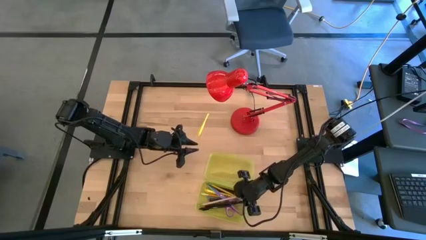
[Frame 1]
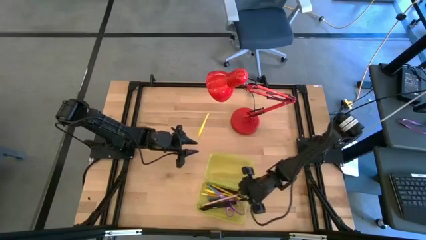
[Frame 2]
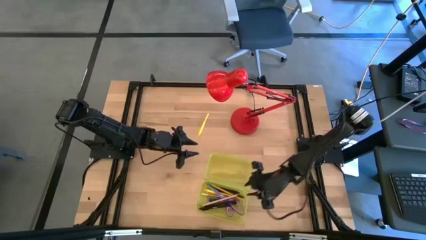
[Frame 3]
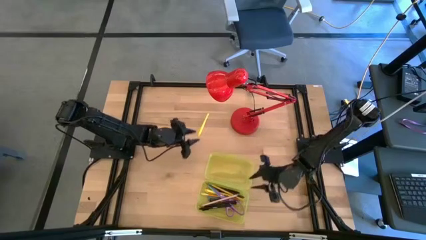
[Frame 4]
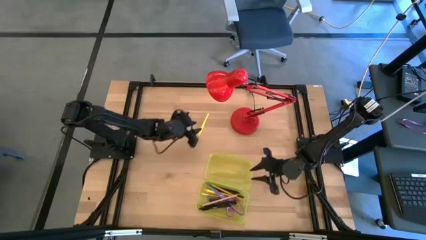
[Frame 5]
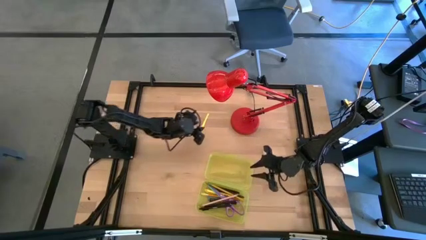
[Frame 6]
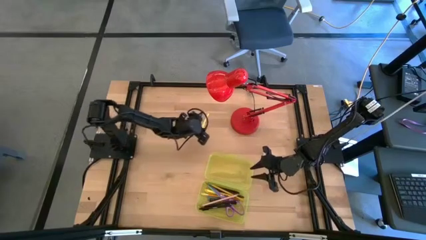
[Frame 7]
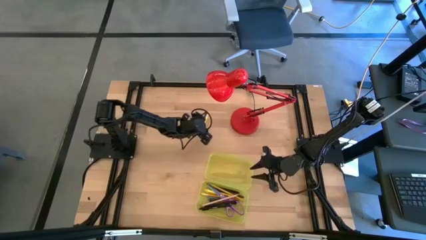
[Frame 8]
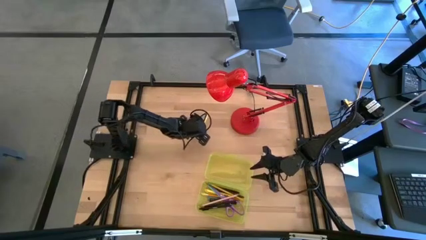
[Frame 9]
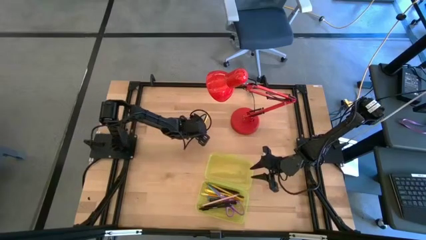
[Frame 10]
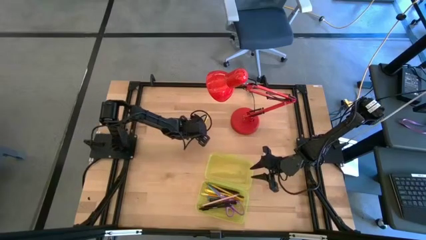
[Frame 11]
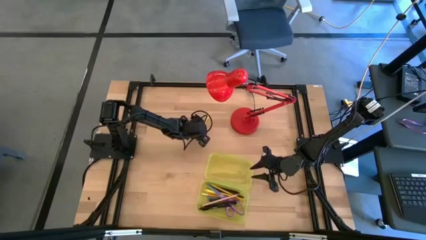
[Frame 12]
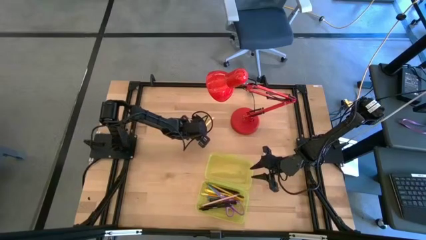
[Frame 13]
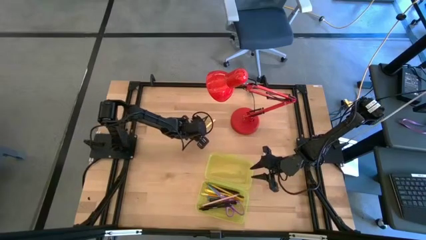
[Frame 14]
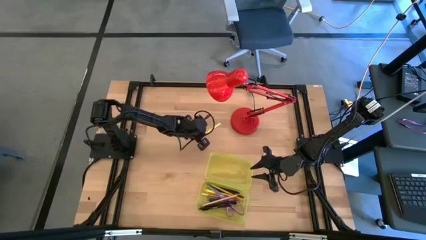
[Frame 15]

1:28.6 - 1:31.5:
Task: Pick & place school supplies into a supply box
Put the yellow pen into the yellow supply box

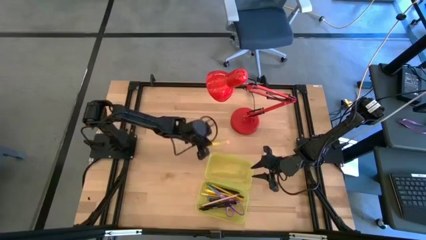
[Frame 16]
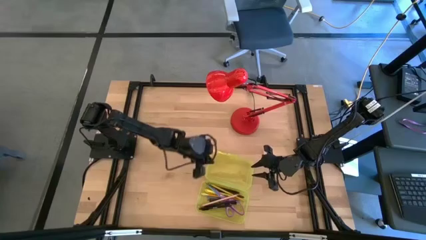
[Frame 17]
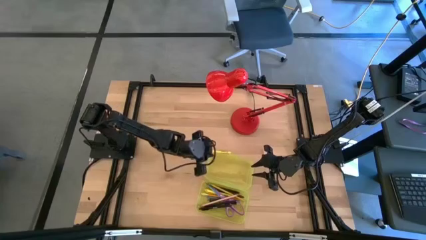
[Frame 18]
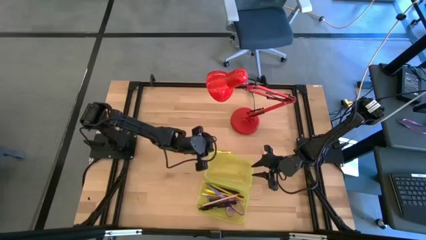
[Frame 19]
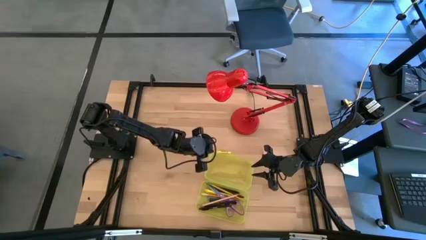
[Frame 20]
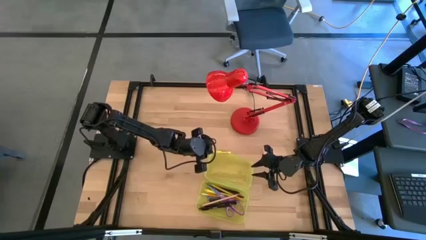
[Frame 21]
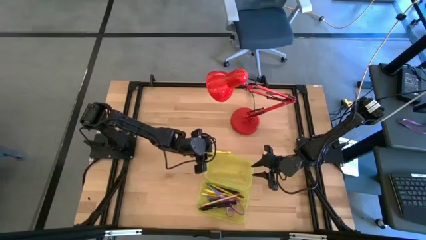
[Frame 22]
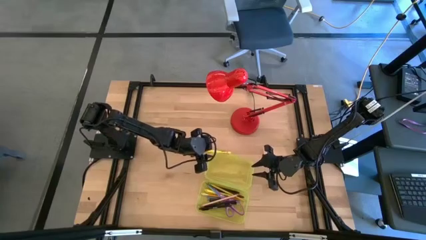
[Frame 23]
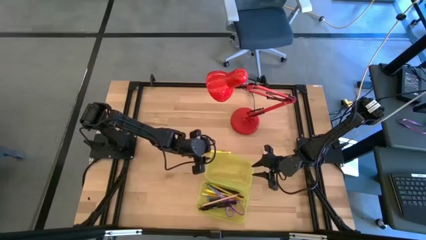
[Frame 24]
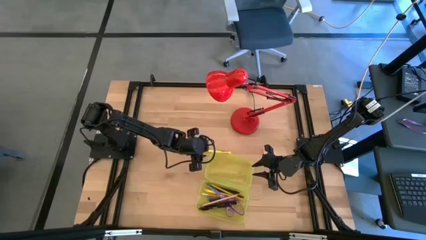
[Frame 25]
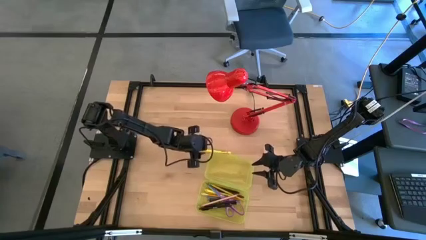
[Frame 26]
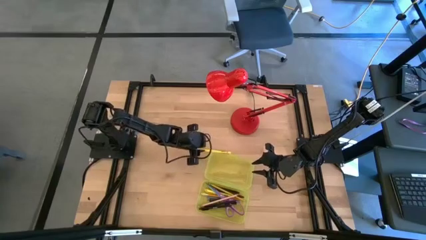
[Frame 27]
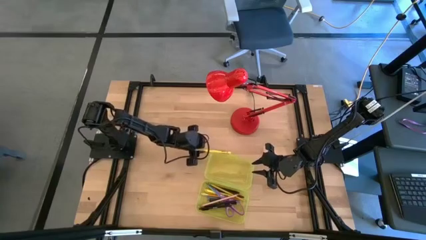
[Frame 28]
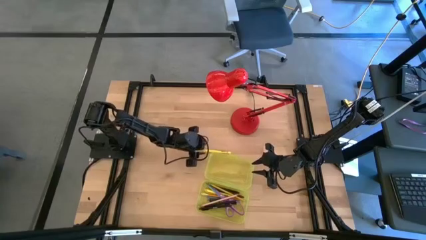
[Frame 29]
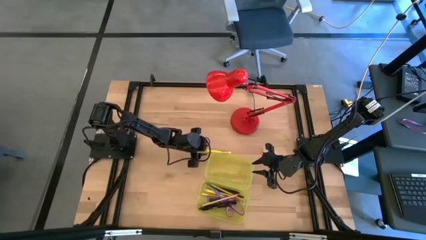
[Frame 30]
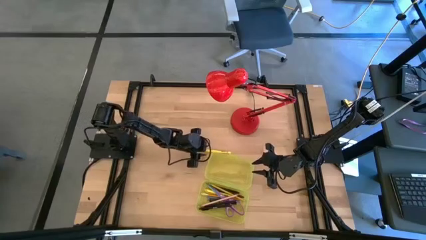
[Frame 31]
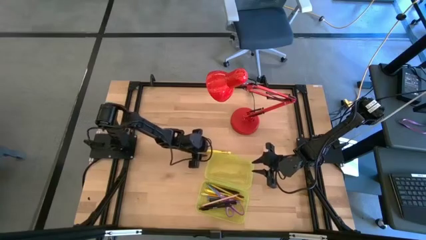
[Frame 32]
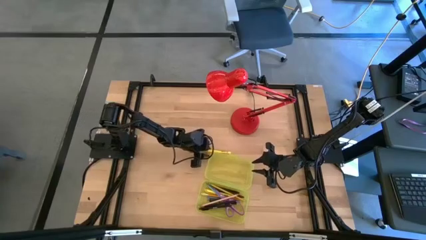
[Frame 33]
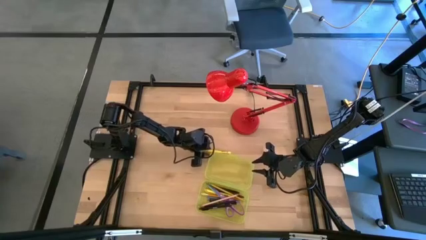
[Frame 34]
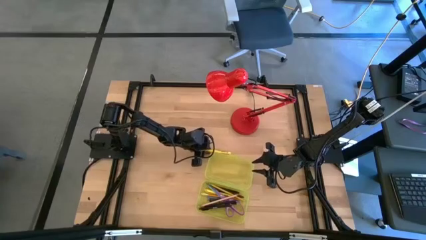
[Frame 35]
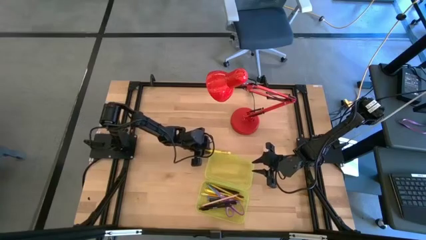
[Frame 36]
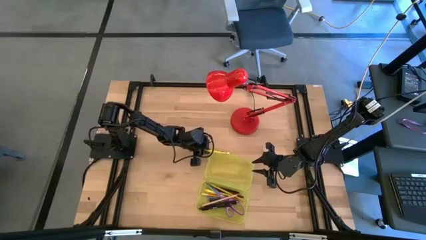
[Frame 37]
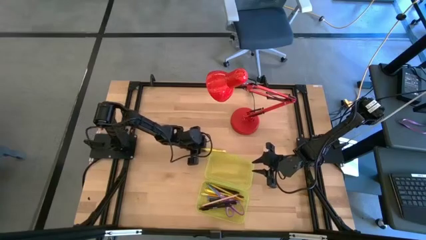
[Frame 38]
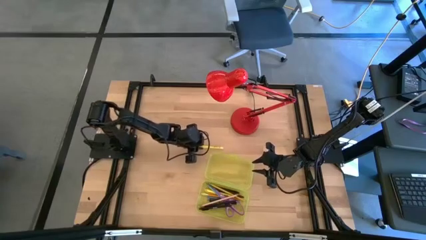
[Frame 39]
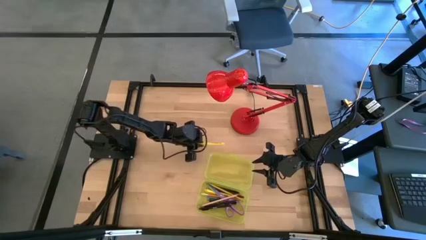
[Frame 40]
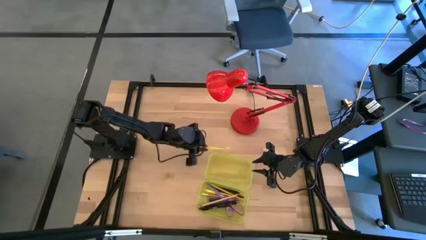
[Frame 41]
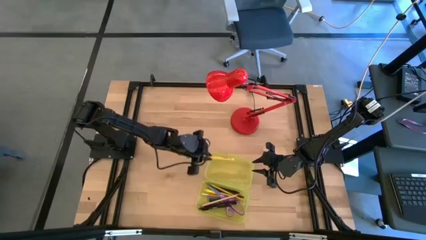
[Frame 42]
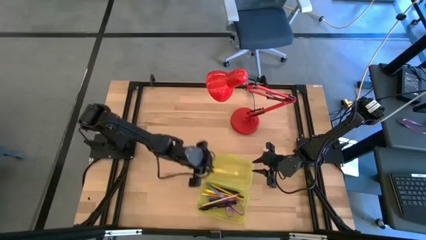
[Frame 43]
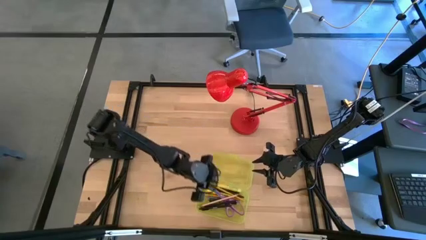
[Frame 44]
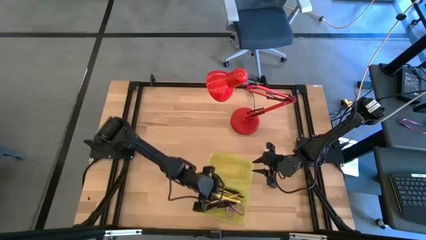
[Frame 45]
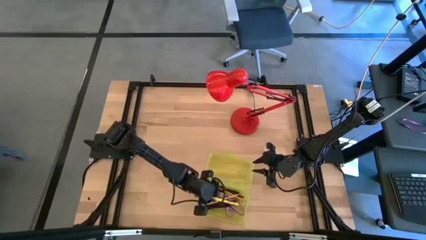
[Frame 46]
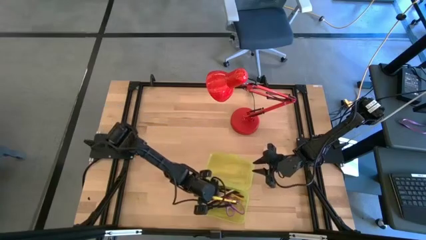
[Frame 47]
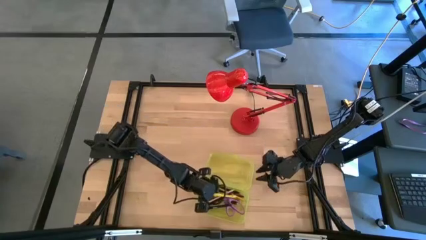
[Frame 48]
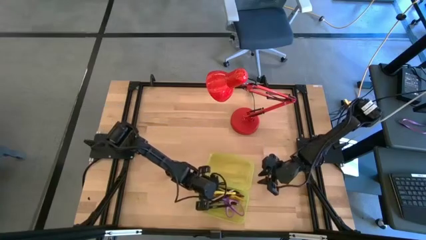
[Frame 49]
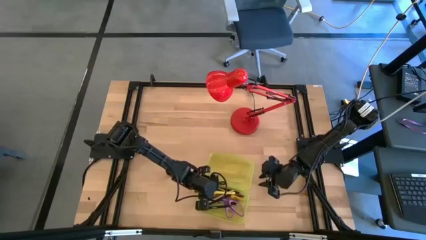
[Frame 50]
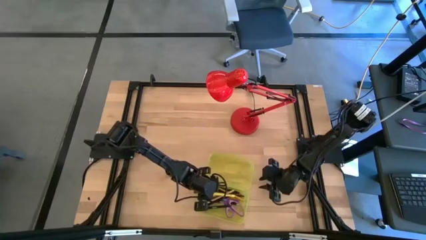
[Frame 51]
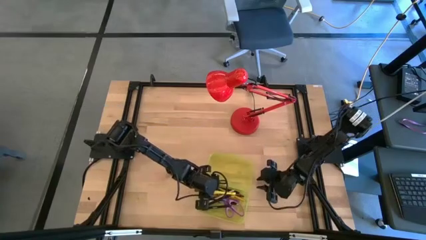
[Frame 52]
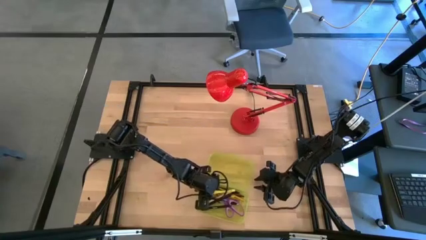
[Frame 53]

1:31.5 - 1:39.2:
Put the yellow pen into the yellow supply box

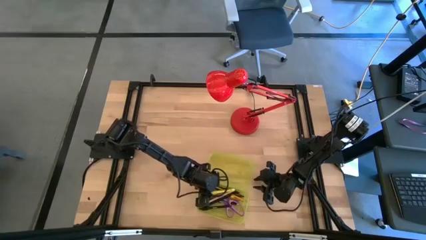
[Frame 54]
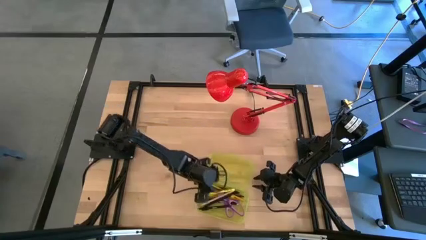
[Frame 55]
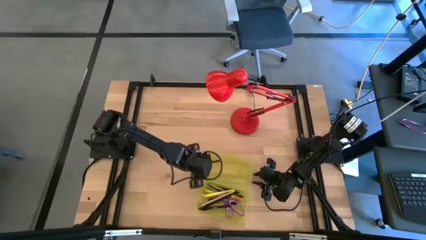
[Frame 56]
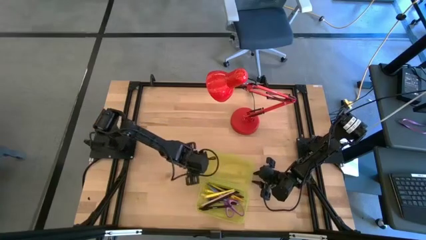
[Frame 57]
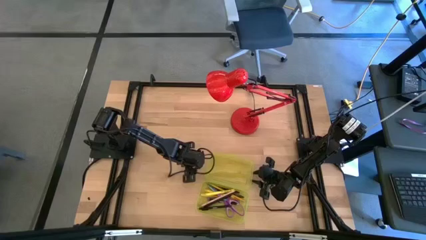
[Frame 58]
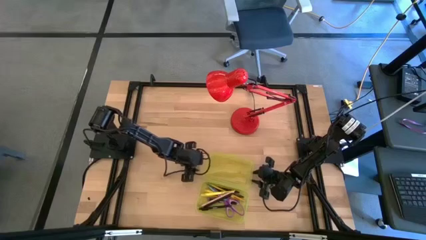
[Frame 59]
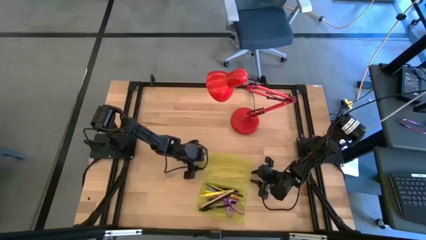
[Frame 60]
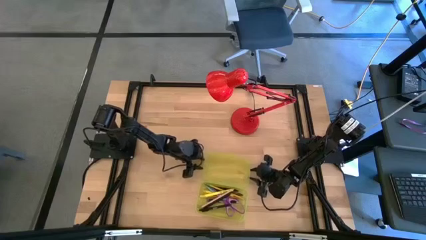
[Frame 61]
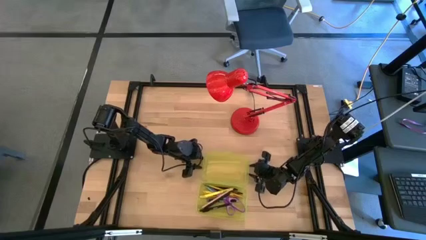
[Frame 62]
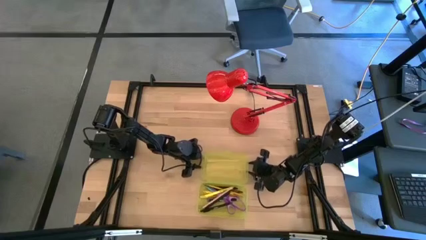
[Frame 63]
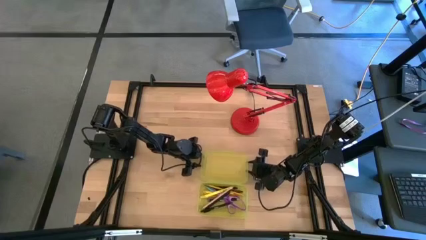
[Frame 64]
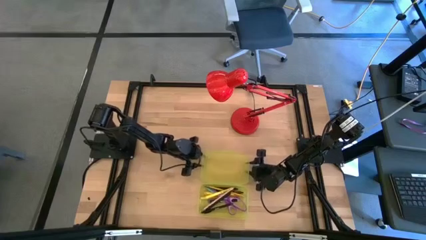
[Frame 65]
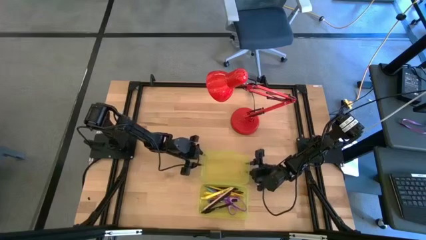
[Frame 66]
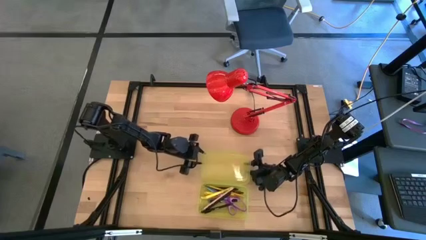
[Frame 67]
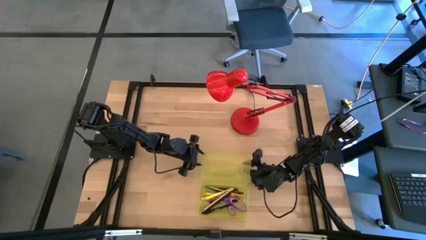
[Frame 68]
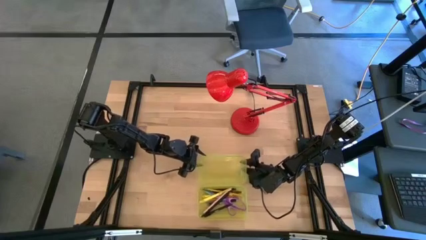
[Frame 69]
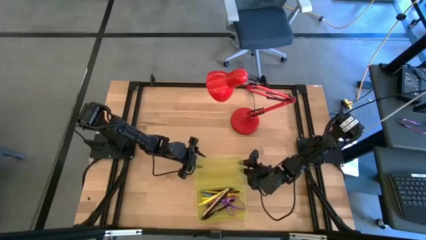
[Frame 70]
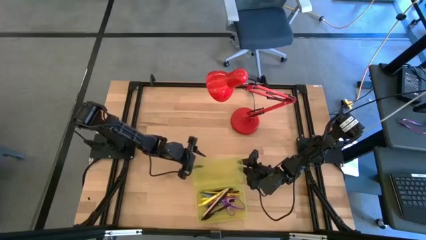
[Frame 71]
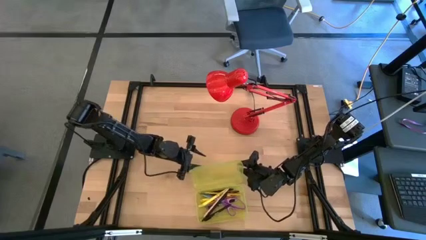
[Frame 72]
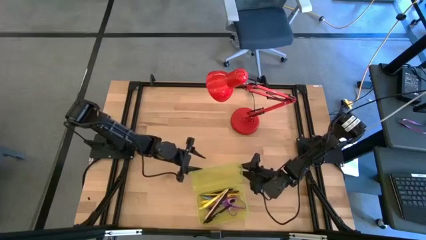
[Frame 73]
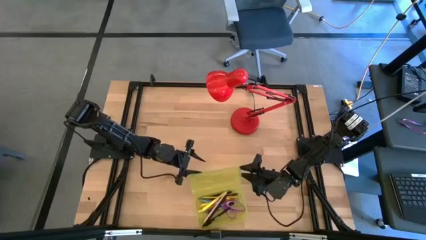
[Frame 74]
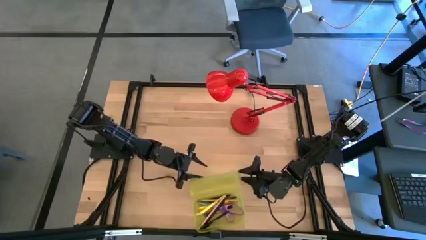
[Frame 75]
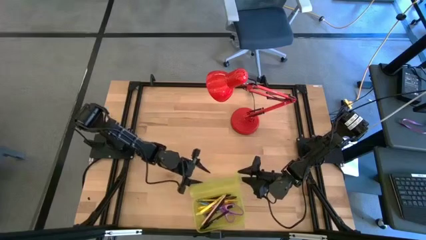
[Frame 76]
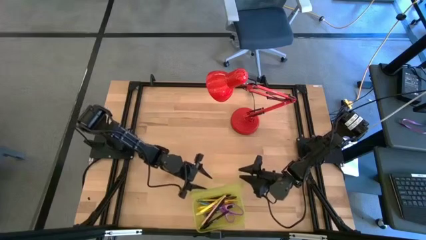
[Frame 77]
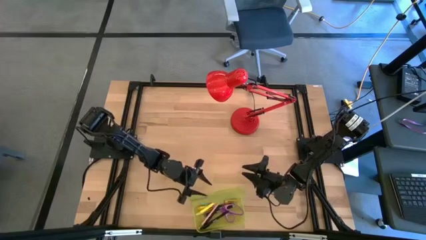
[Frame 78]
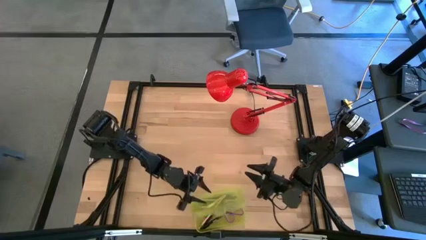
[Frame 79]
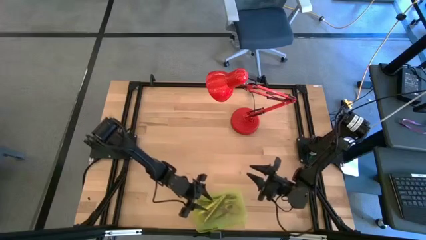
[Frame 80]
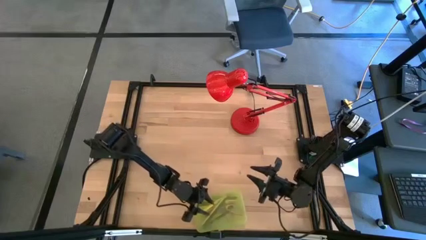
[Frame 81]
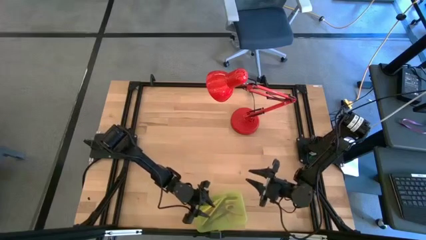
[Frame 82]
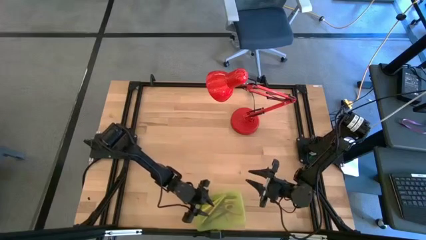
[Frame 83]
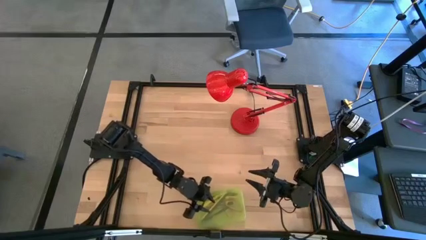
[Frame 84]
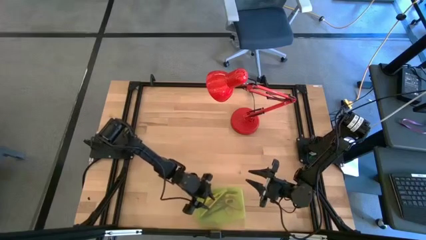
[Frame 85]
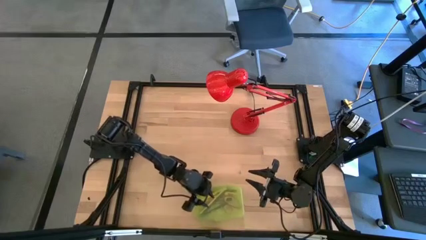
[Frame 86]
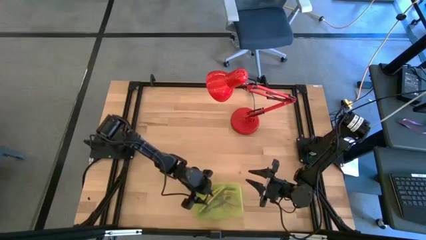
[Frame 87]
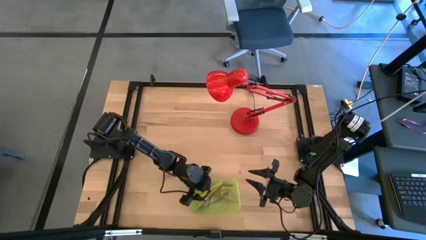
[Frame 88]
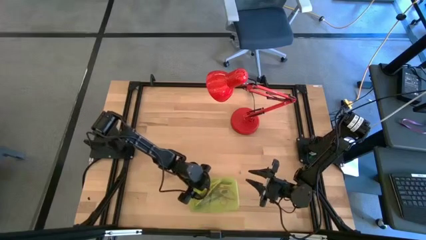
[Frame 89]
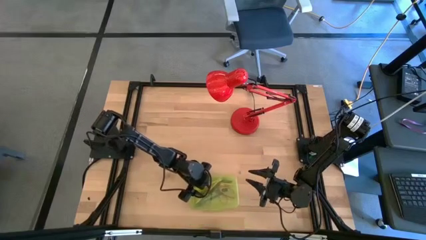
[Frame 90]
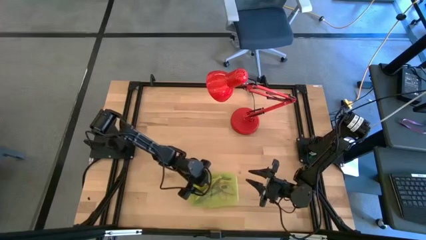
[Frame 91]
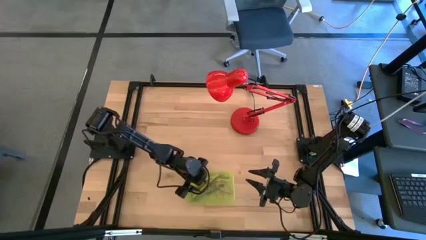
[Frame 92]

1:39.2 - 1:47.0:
Close the yellow supply box
